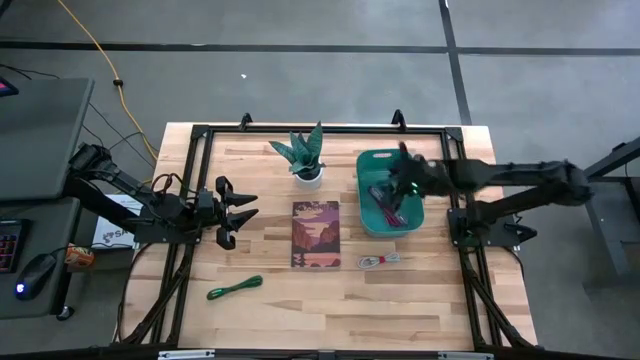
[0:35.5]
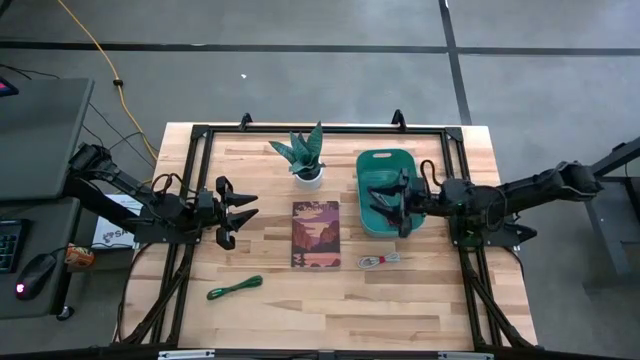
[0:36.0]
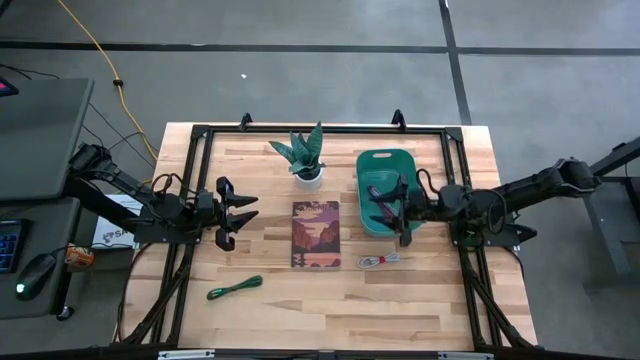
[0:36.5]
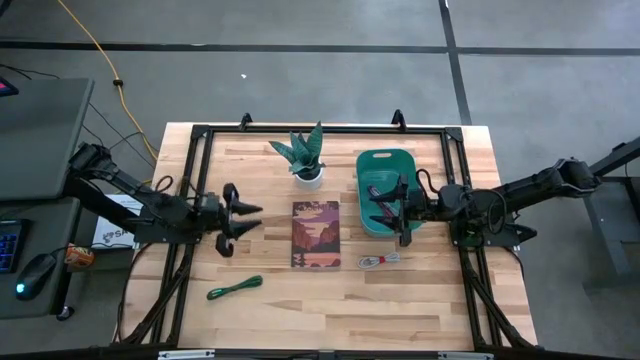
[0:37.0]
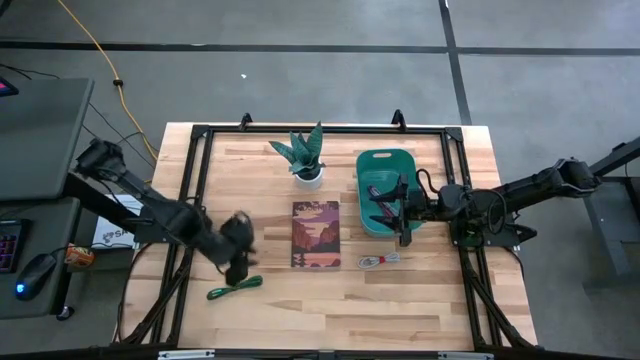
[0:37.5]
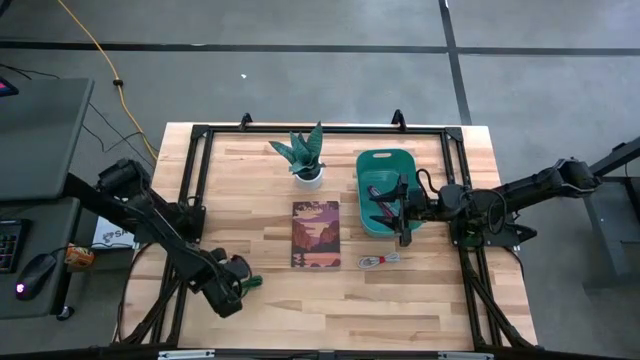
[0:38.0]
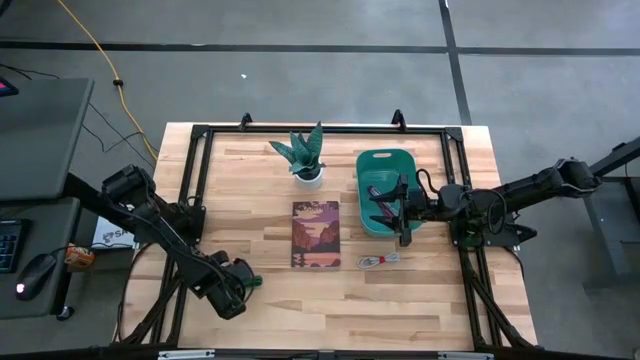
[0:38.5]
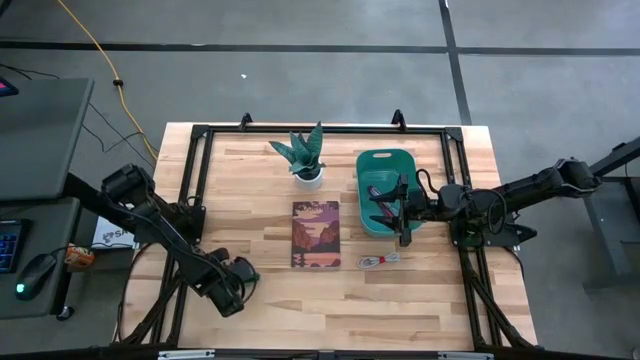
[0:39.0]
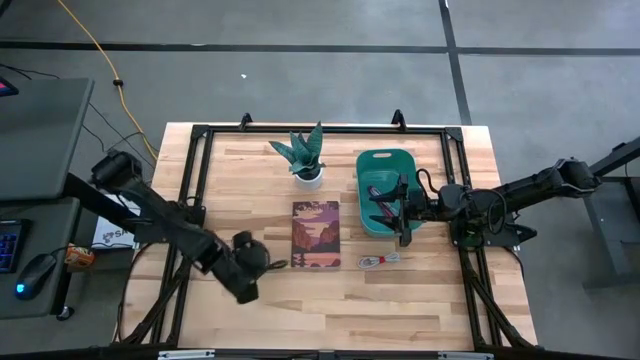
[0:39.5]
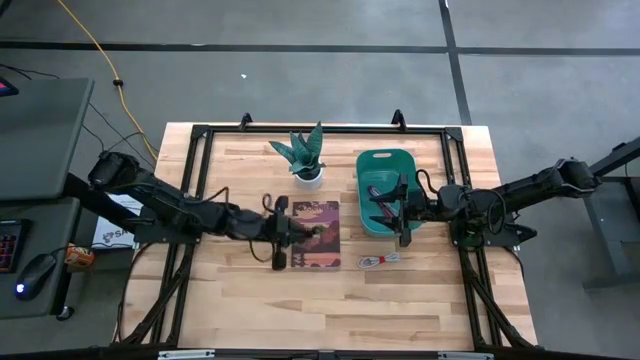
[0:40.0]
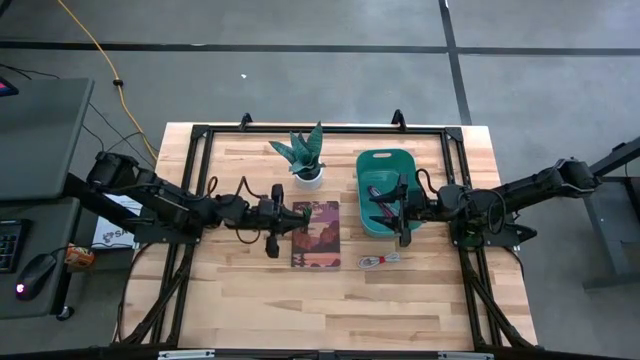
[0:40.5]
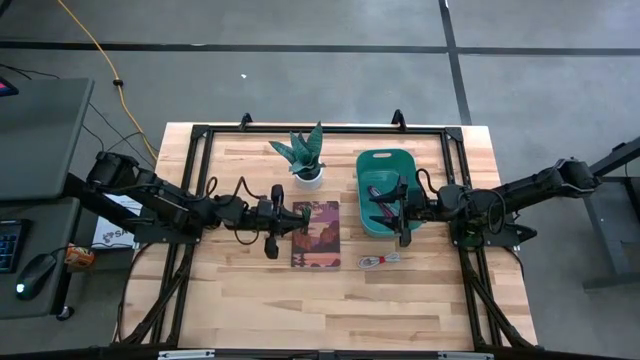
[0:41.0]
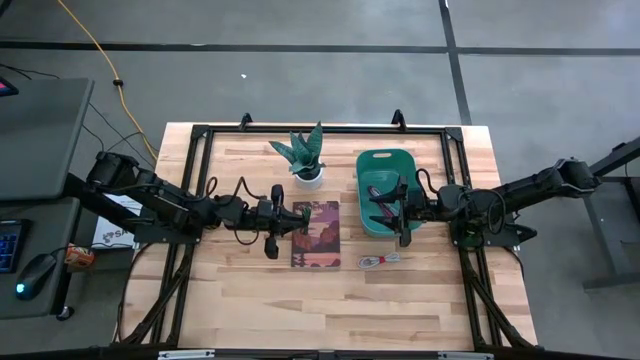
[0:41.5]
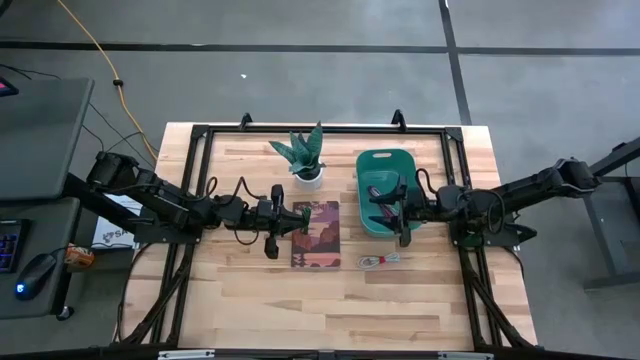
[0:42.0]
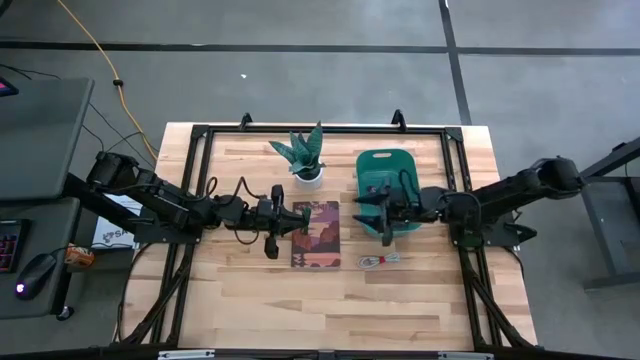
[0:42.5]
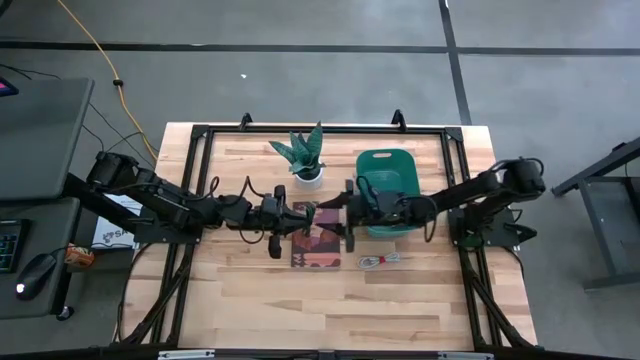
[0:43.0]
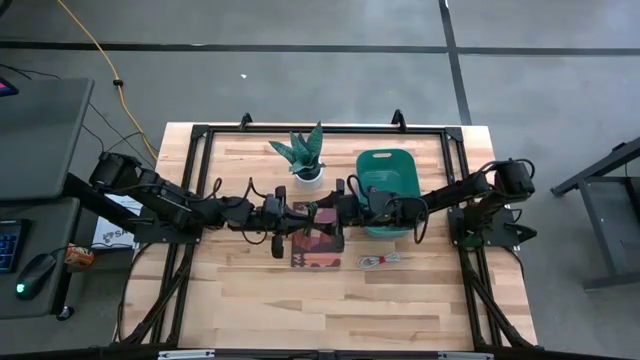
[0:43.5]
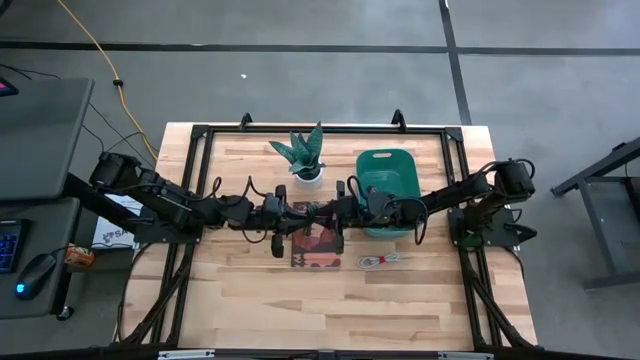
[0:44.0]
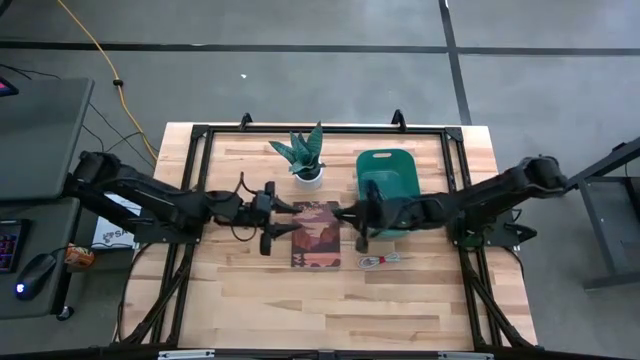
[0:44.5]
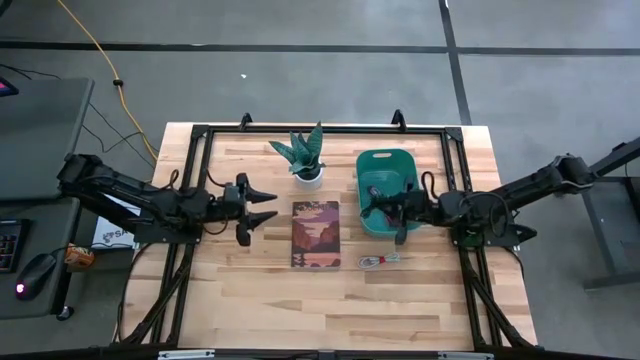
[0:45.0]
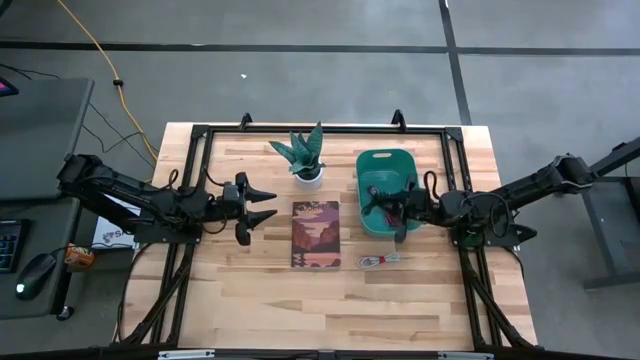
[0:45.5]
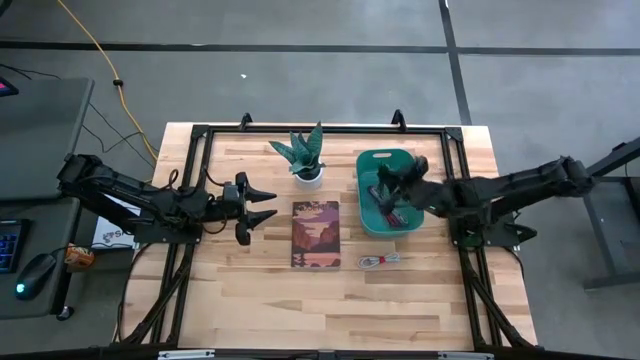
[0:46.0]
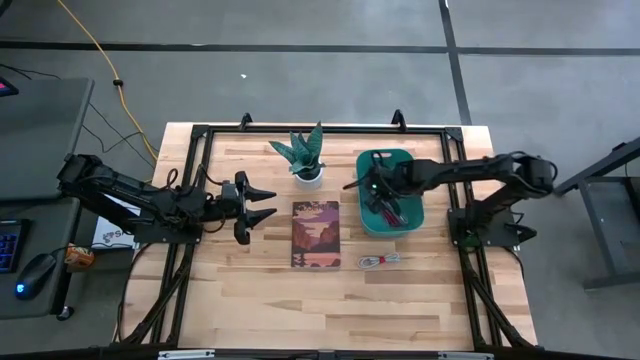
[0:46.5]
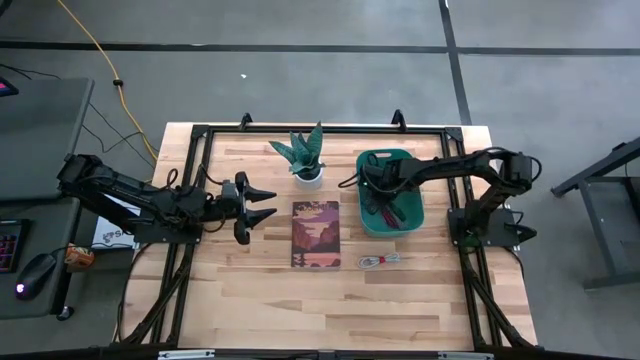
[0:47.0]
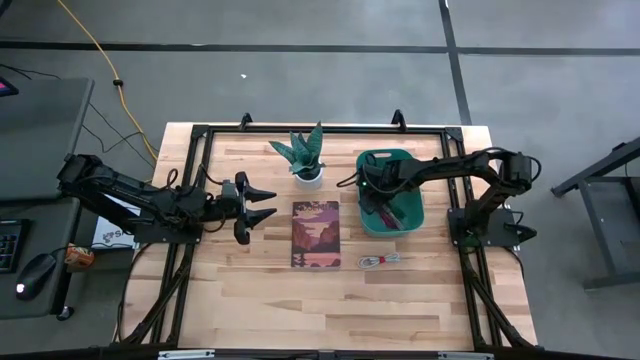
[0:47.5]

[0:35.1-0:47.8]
Task: Pick and place USB-C Cables
Put the green charger cable into the green bin

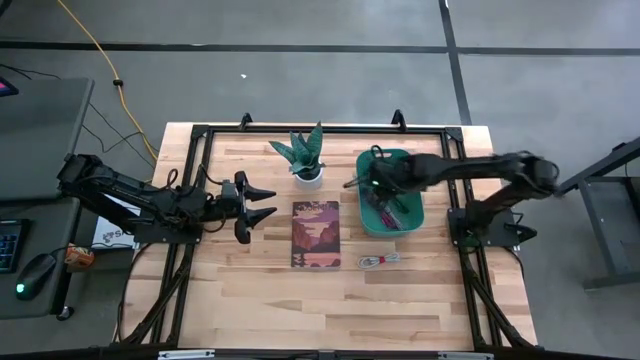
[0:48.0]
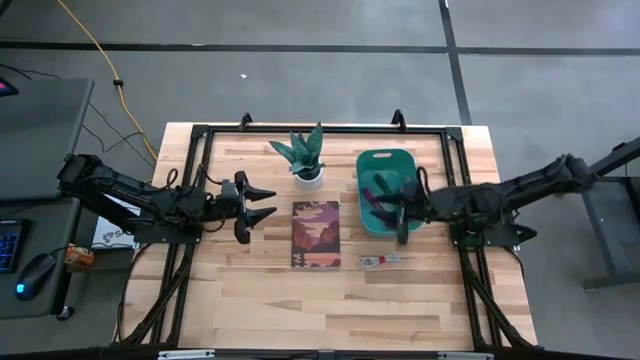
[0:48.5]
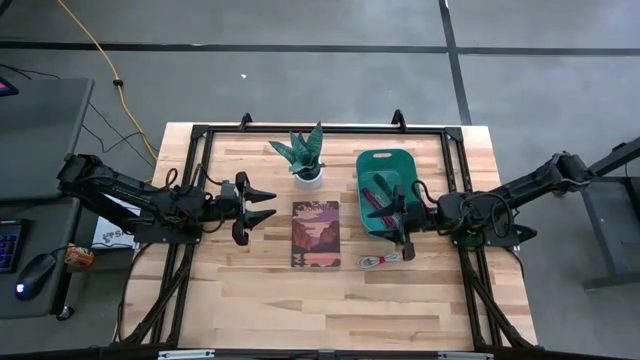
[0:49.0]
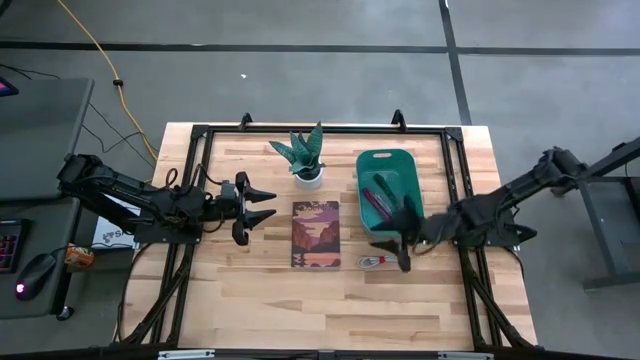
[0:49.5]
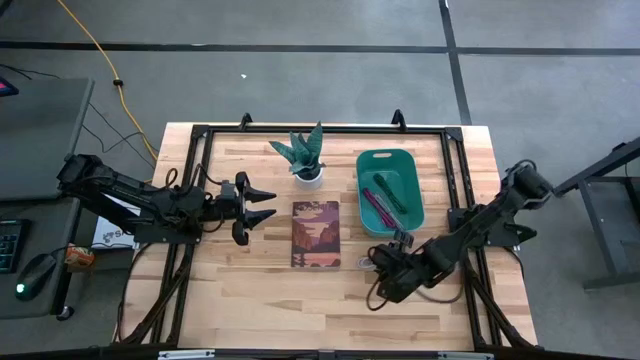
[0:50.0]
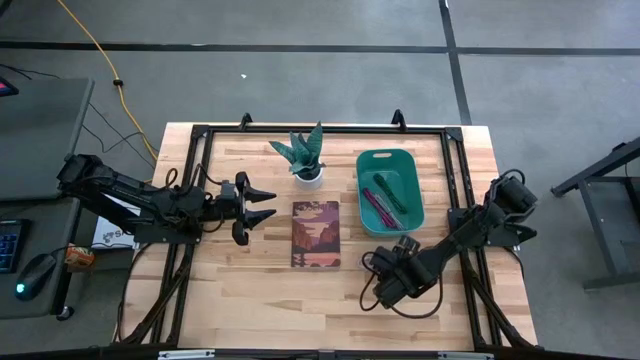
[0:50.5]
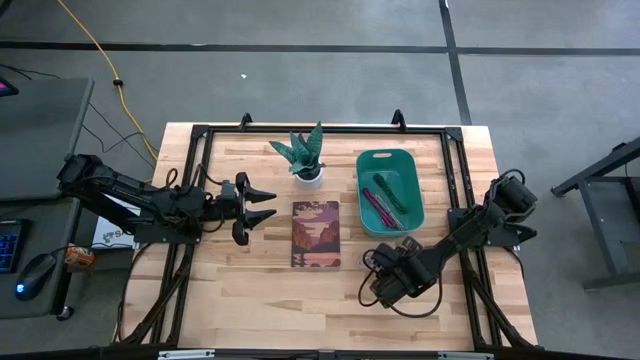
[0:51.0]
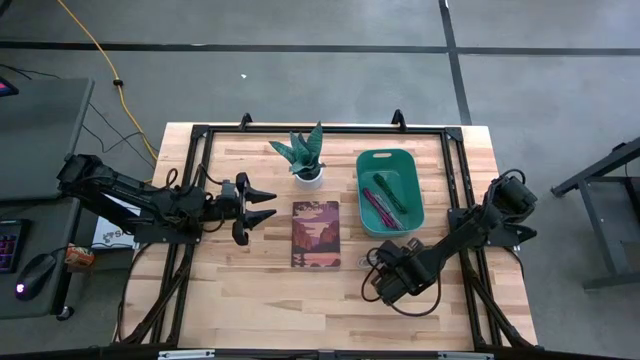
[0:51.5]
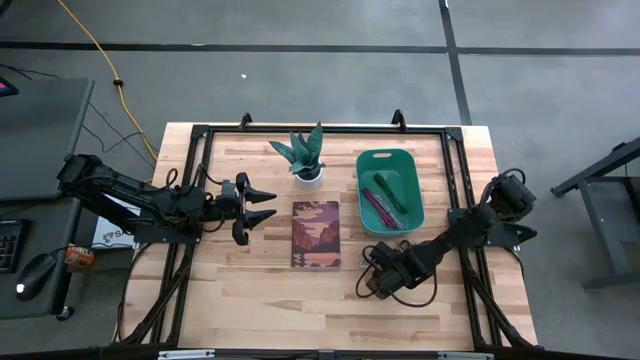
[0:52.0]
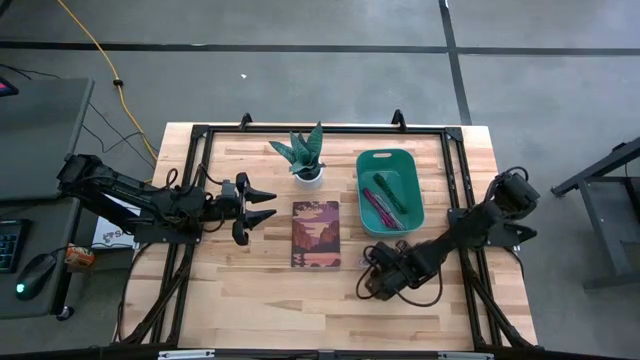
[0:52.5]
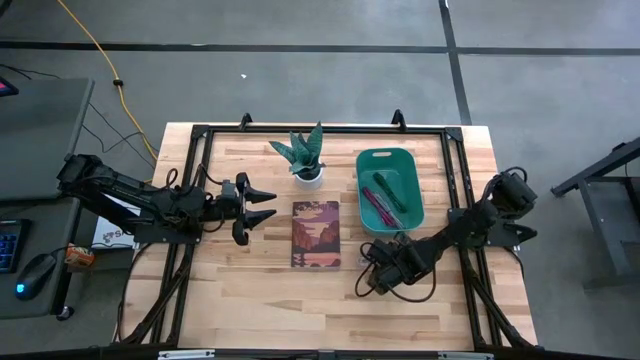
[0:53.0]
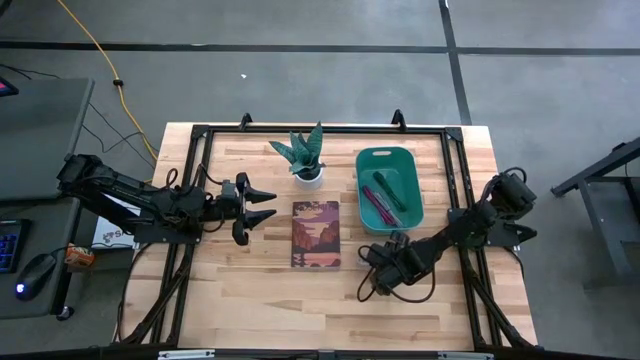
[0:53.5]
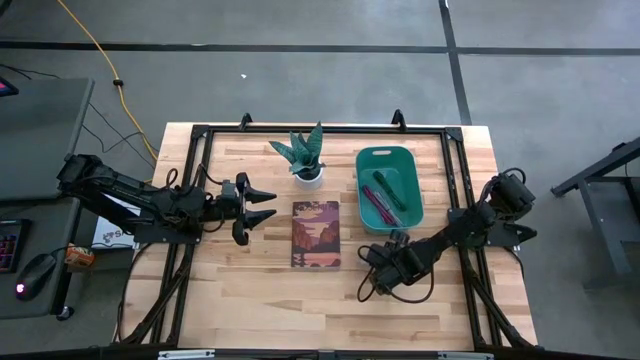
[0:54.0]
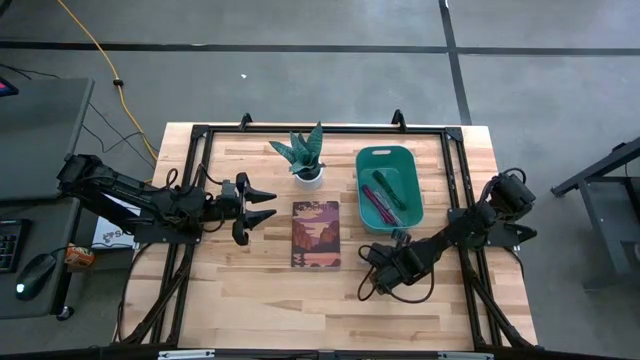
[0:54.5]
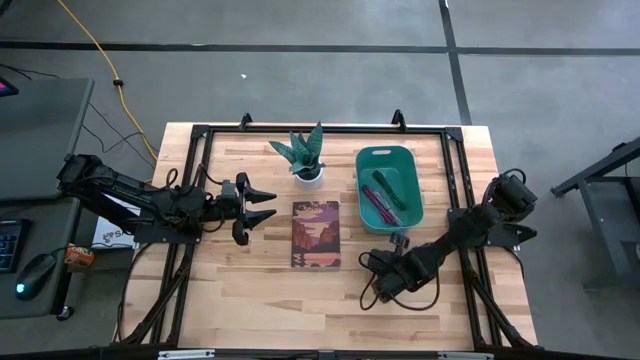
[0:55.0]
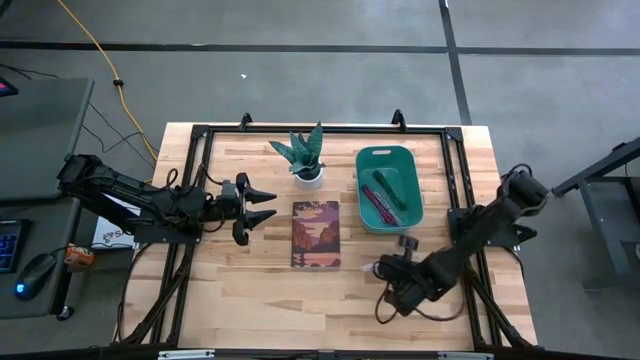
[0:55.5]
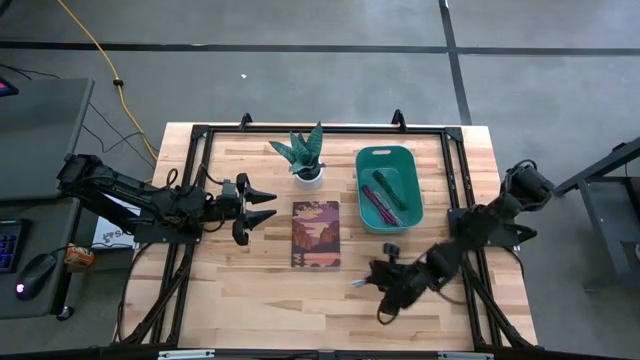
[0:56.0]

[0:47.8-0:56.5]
Put the white charger cable into the green bin
